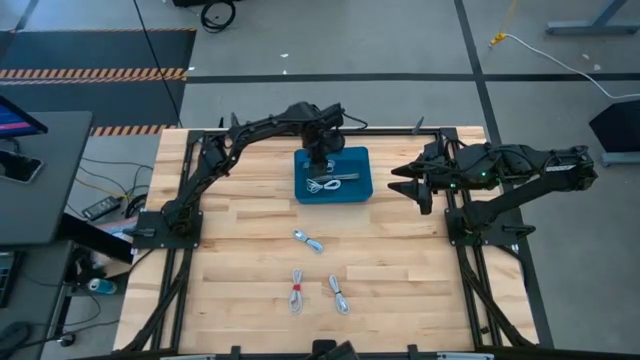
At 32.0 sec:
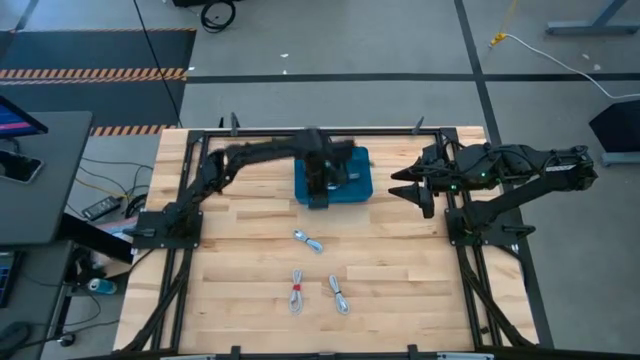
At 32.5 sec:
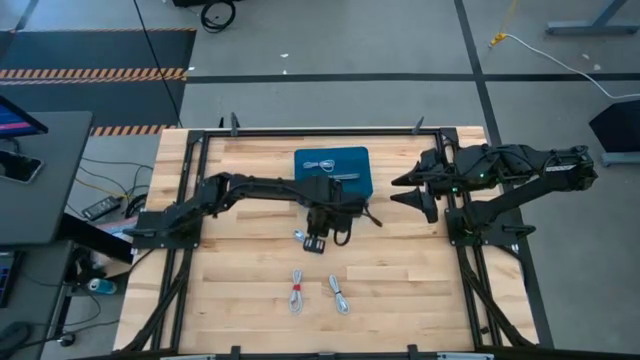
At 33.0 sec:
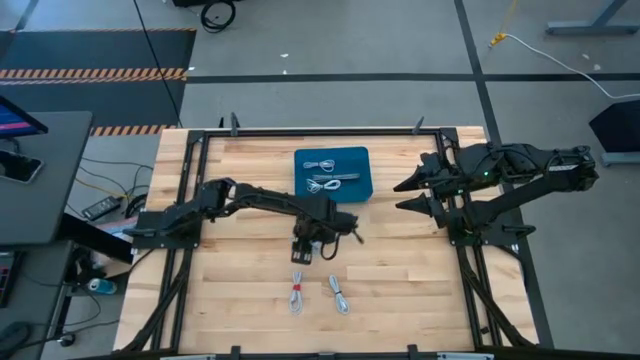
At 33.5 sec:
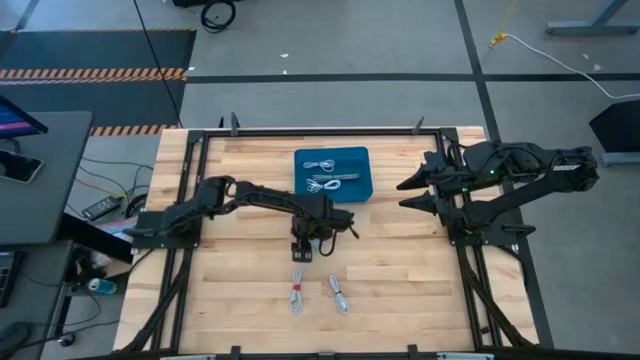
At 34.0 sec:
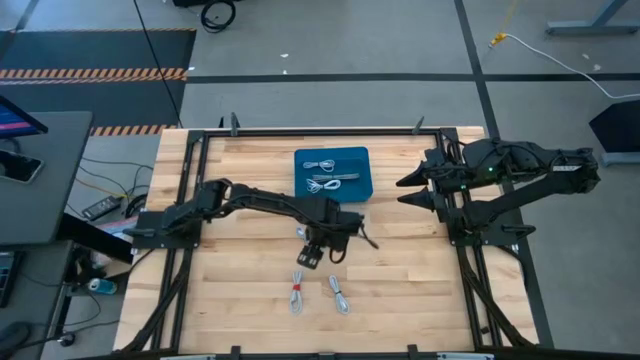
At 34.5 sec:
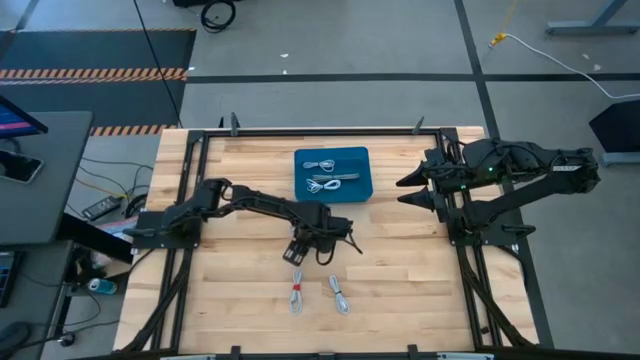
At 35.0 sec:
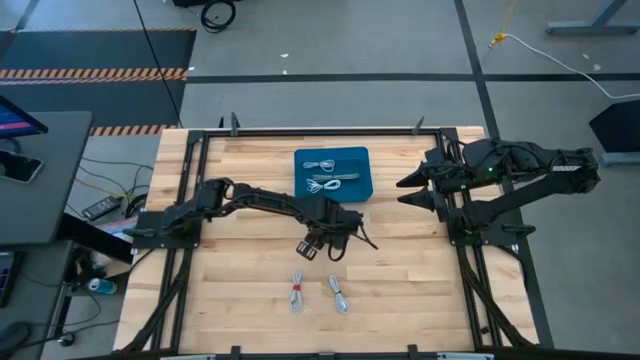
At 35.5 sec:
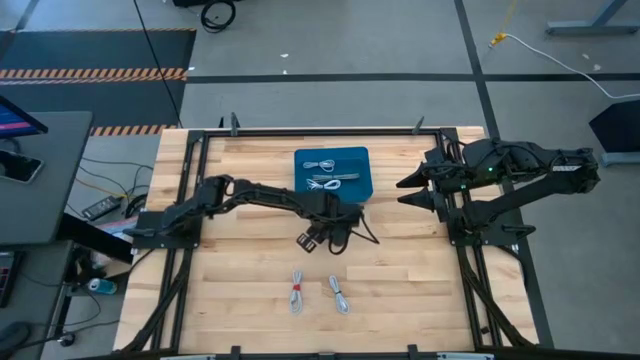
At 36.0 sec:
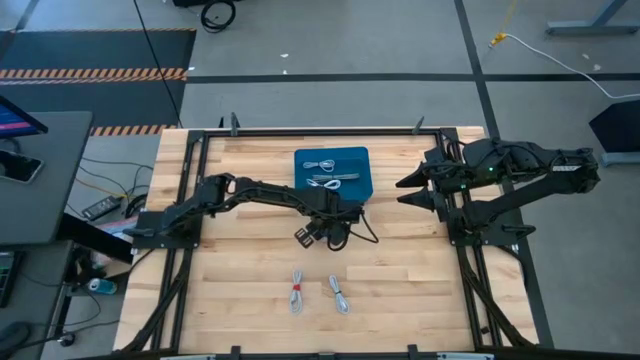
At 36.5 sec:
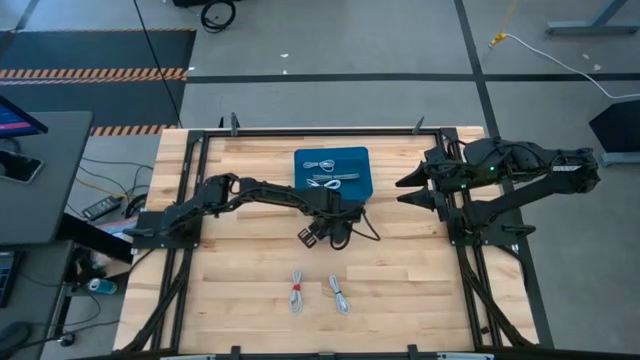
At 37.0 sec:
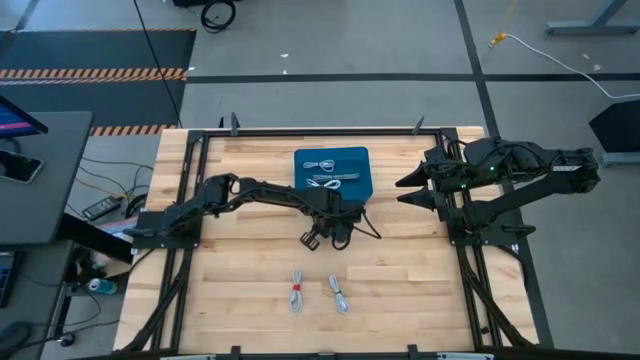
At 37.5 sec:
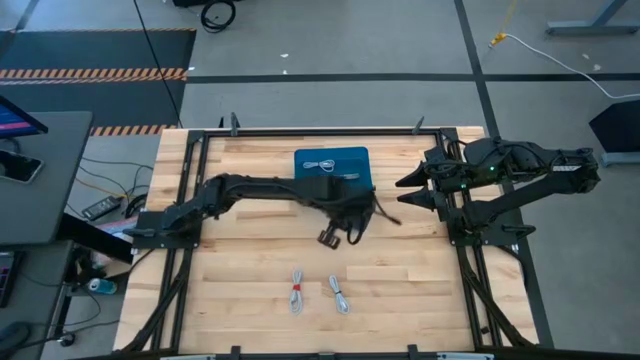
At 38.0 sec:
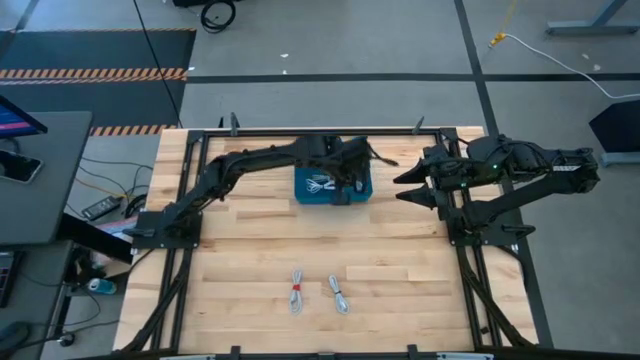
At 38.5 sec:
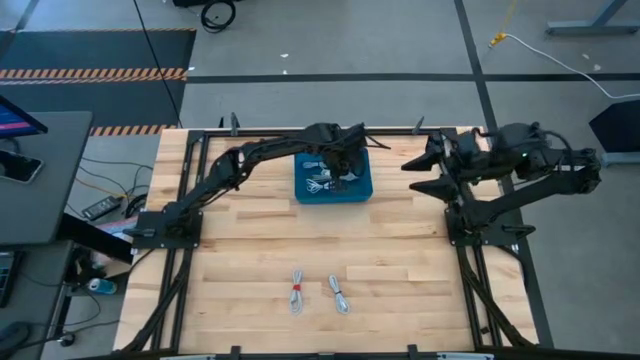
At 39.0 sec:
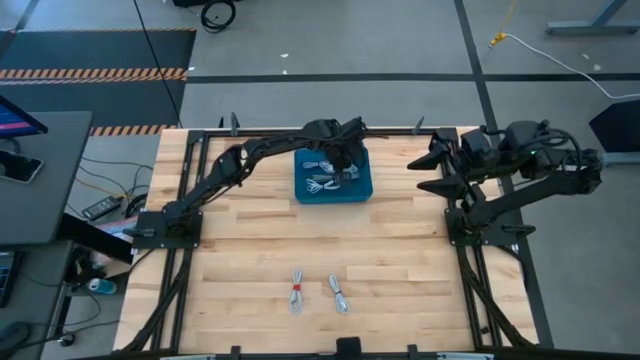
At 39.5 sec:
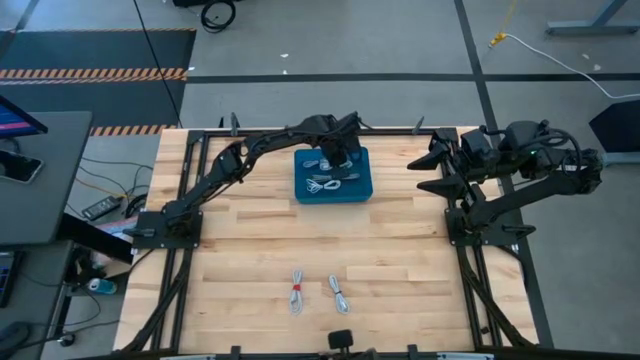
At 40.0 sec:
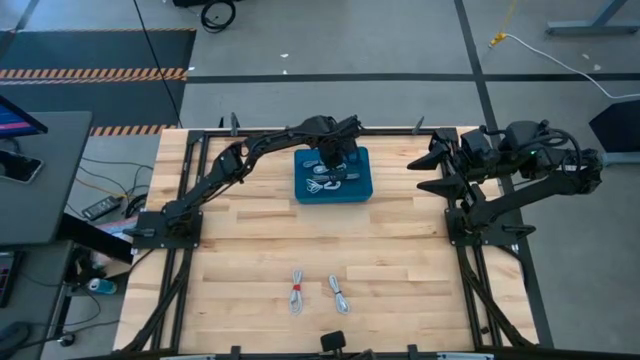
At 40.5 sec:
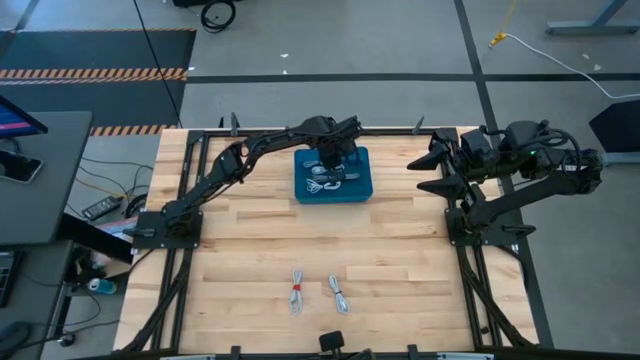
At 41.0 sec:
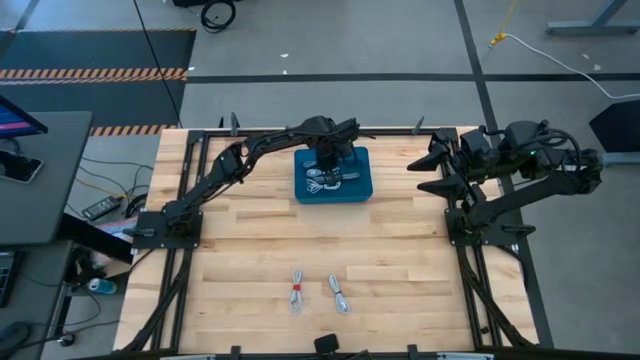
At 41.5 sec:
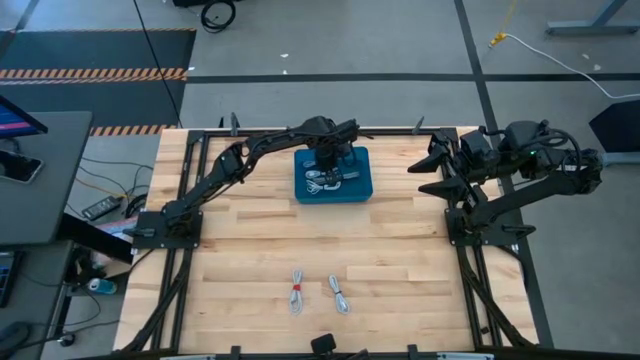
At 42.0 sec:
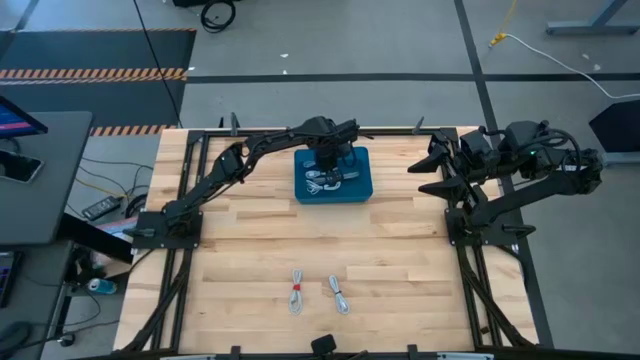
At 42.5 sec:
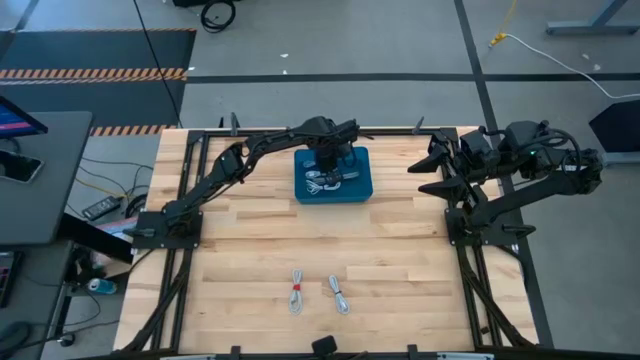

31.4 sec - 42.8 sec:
Task: Pick and place USB-C Cables
Put the blue charger cable into the blue bin

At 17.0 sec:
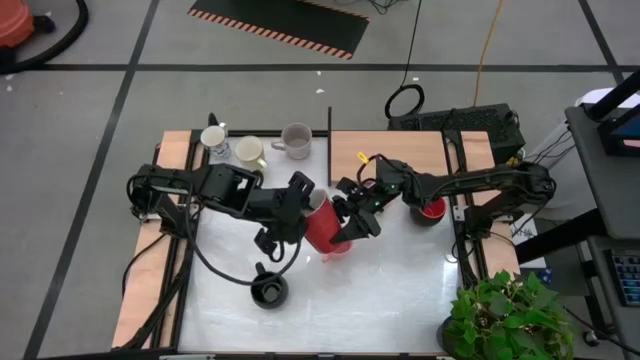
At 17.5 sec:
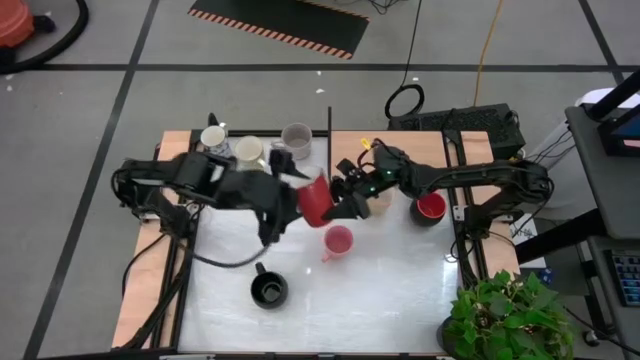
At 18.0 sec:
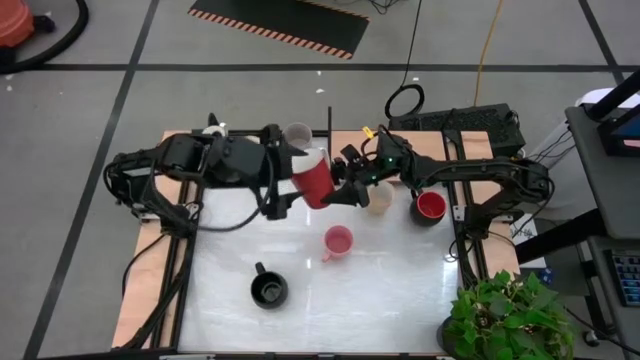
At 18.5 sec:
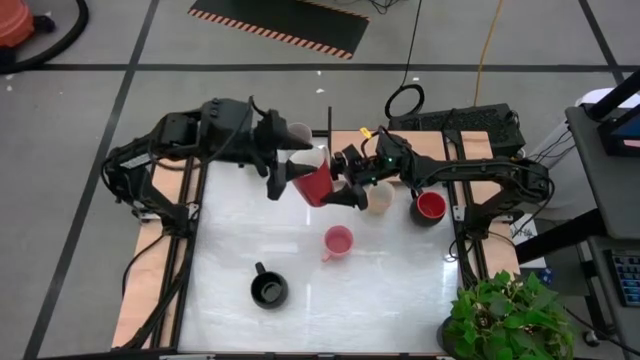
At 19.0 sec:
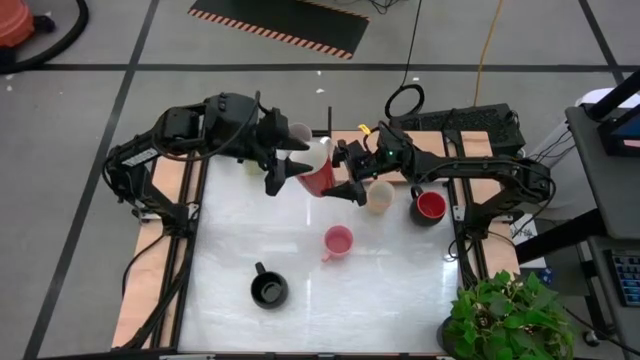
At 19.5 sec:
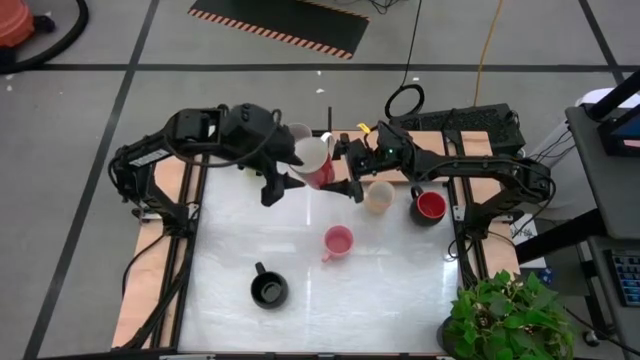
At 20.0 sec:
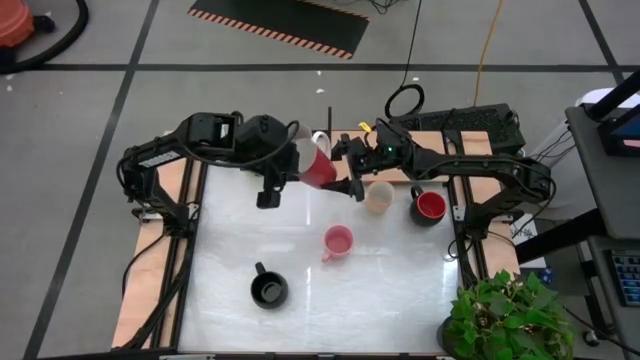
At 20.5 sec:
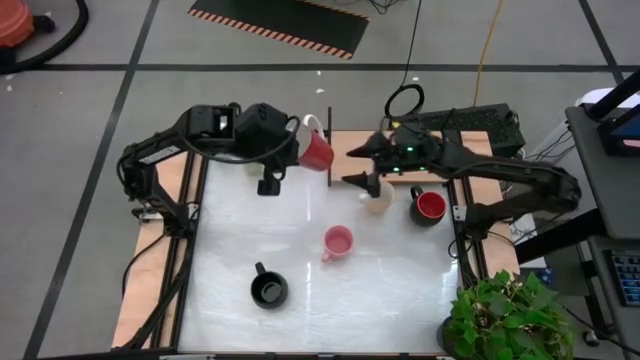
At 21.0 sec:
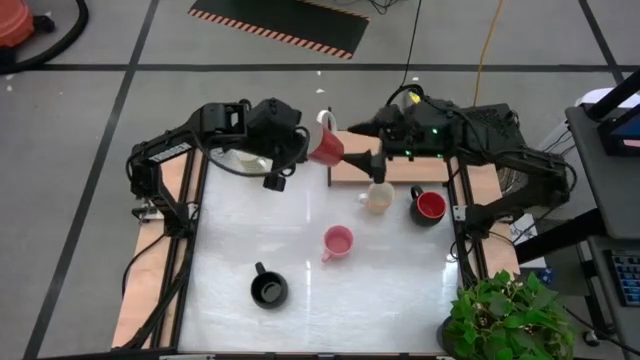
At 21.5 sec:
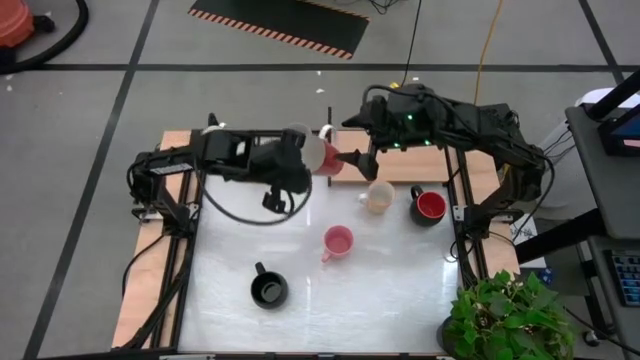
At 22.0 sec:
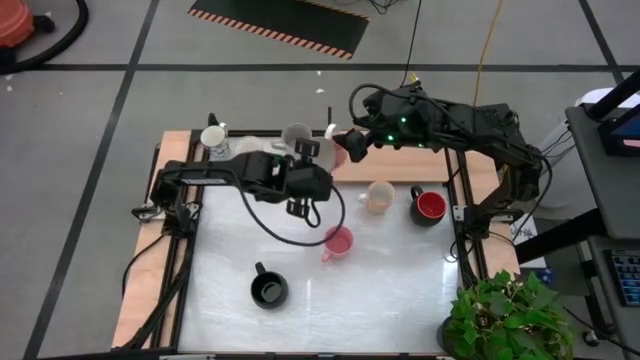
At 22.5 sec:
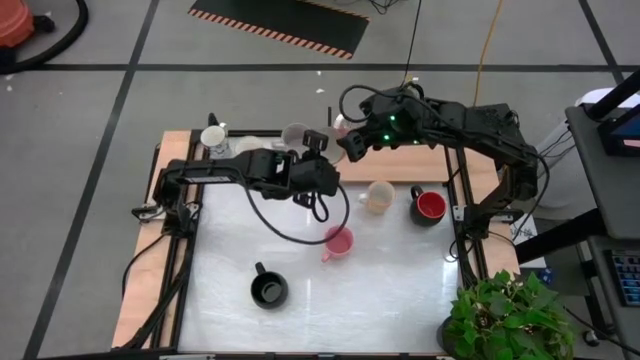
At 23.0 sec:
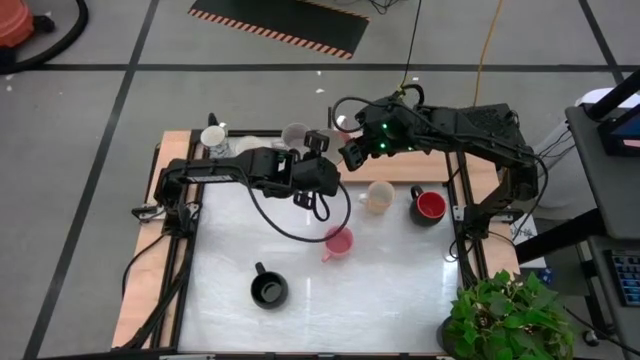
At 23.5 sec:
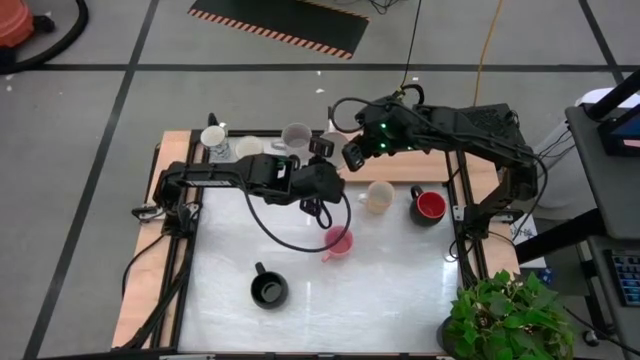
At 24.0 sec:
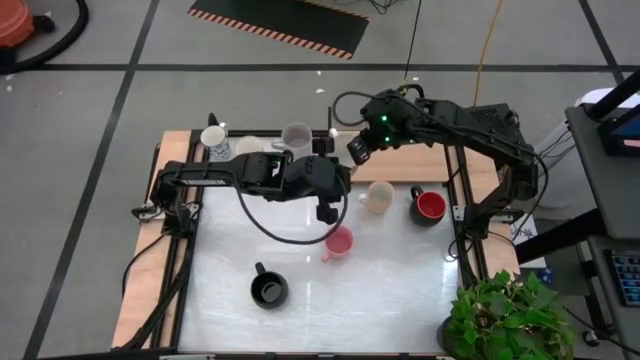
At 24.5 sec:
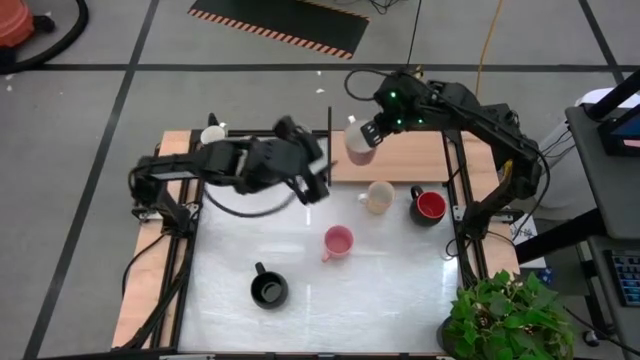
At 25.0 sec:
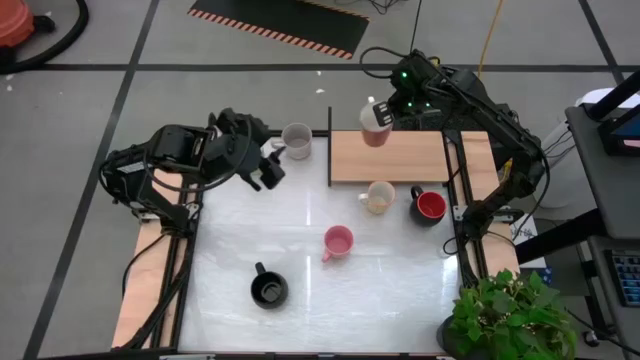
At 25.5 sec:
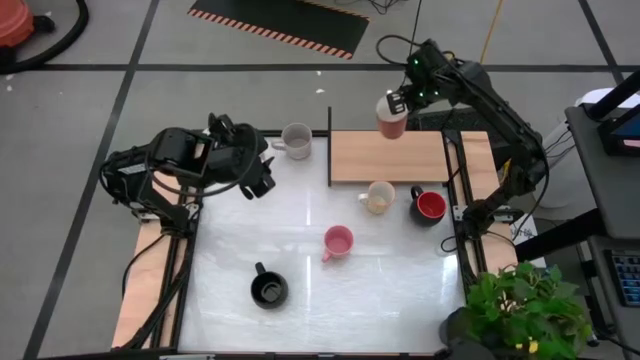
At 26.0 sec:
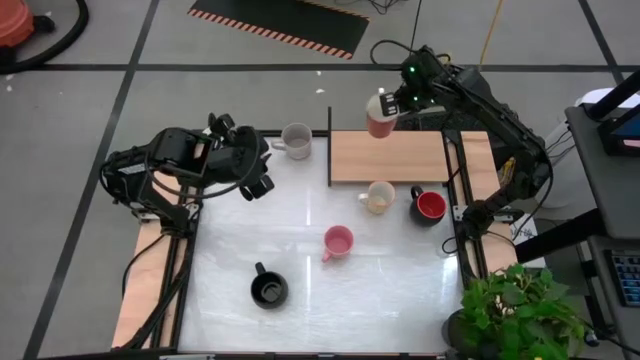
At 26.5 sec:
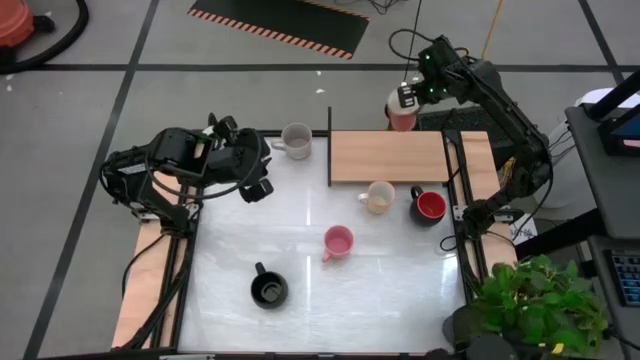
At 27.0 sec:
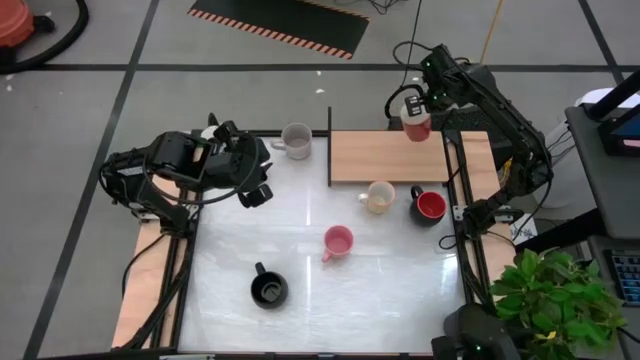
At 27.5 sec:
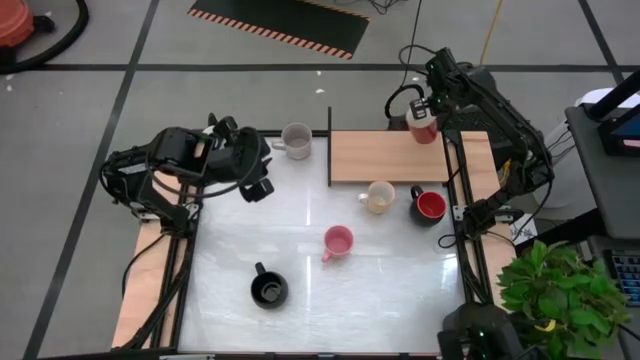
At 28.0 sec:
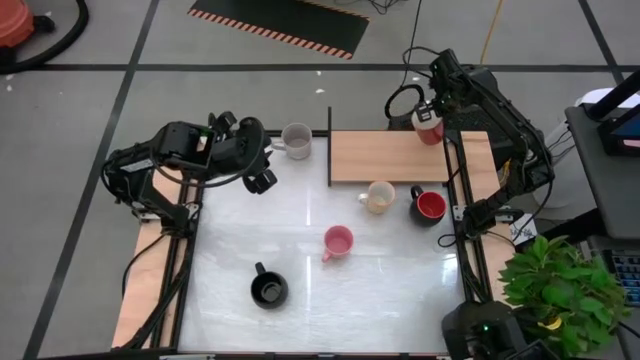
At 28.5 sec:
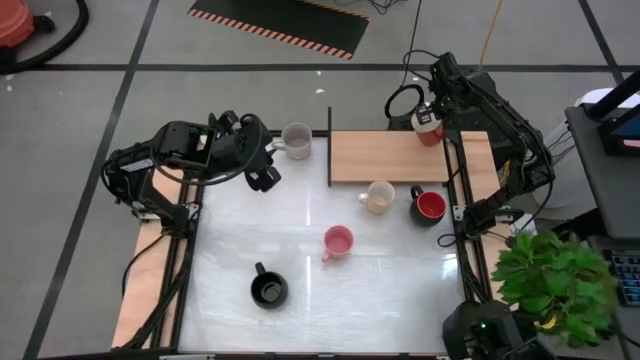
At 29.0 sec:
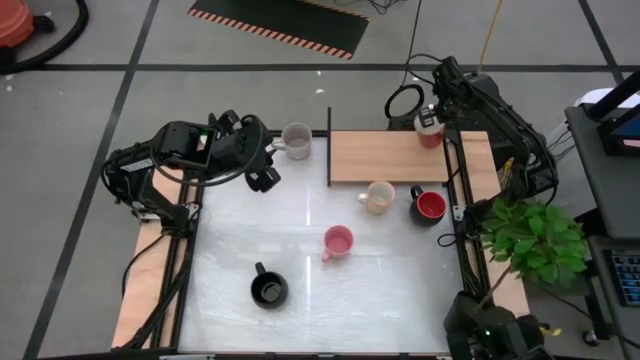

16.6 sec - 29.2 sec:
Task: Place coffee mugs
Put the orange mug on the shelf
